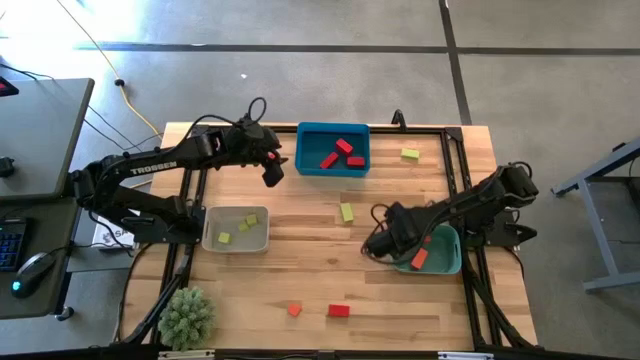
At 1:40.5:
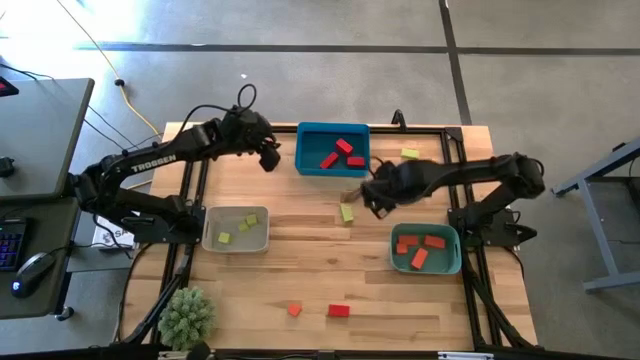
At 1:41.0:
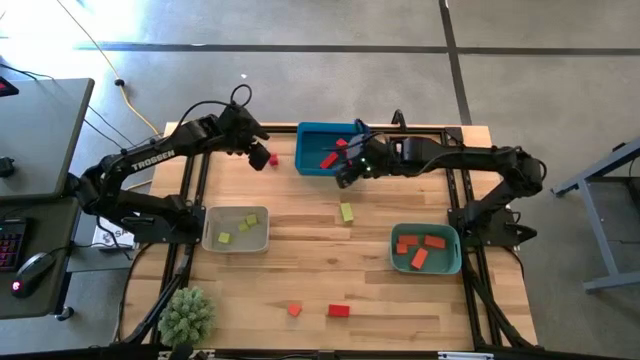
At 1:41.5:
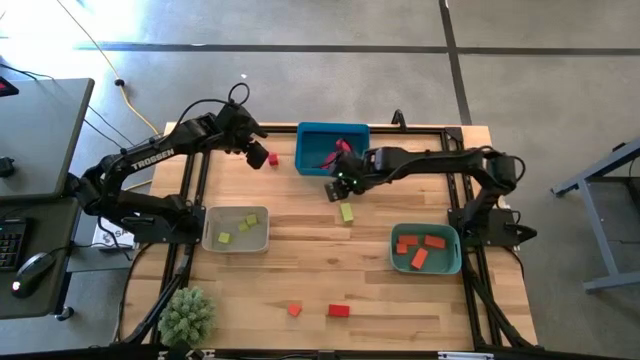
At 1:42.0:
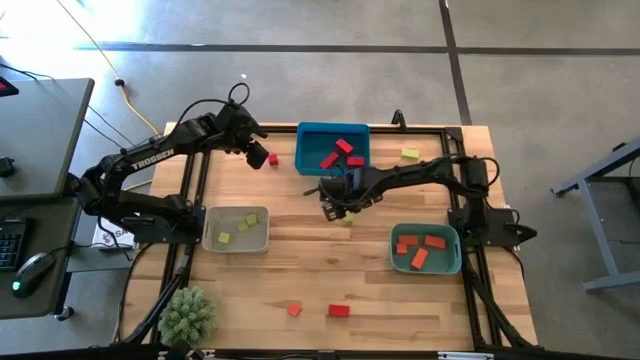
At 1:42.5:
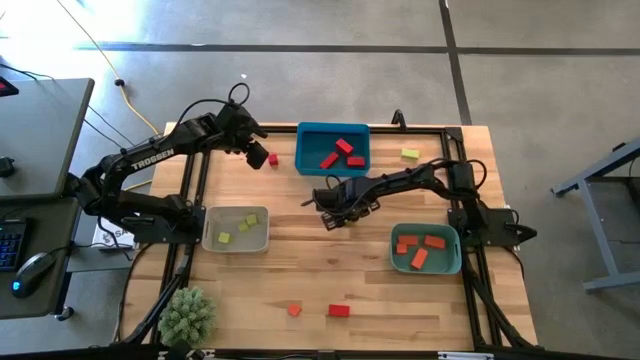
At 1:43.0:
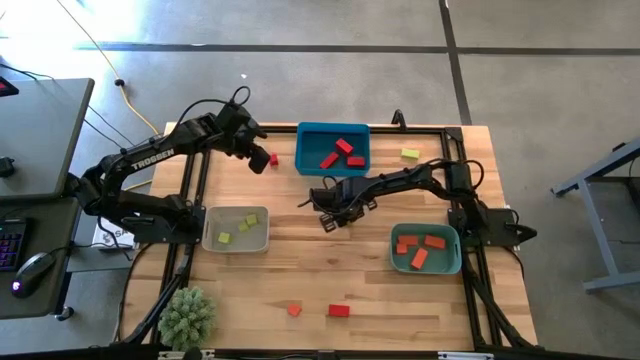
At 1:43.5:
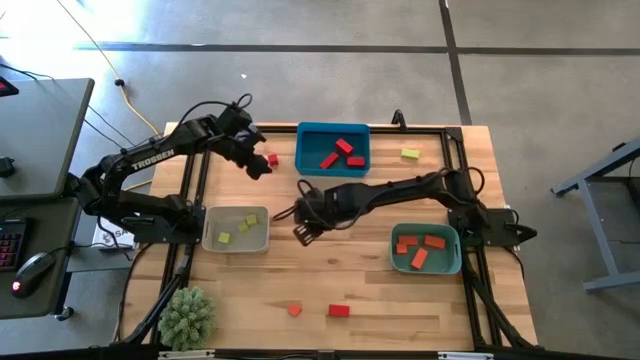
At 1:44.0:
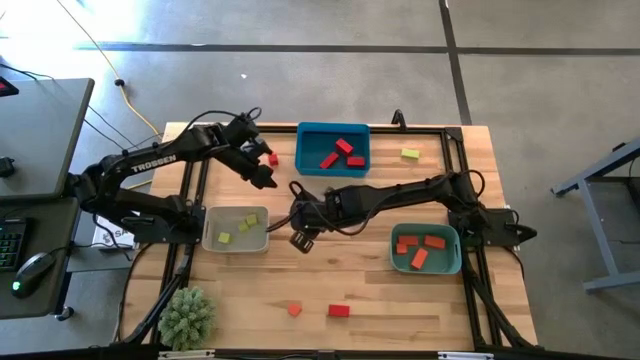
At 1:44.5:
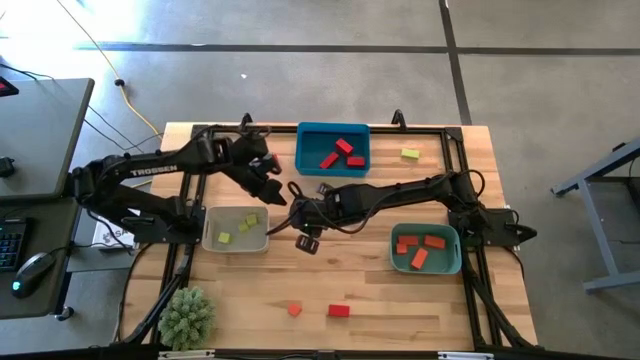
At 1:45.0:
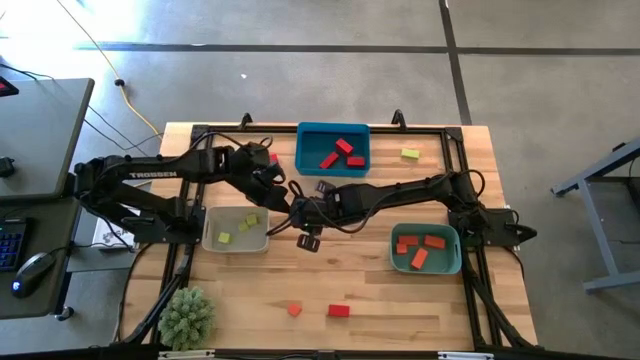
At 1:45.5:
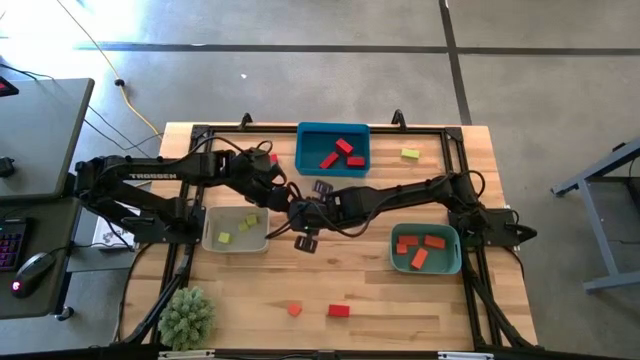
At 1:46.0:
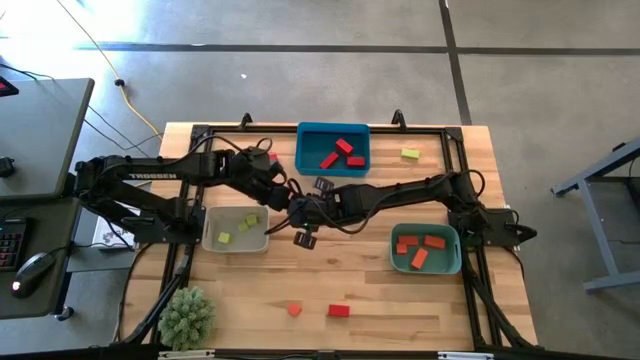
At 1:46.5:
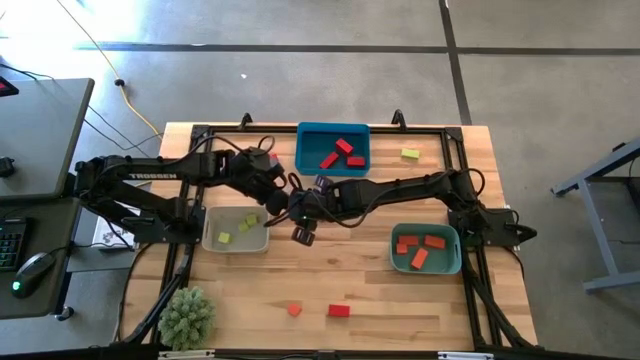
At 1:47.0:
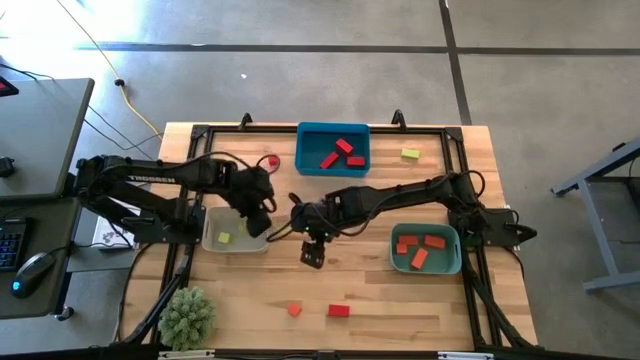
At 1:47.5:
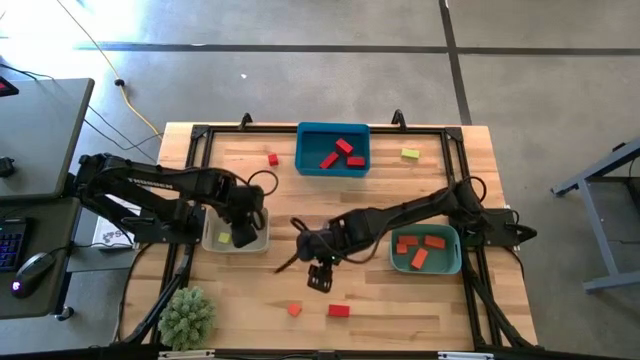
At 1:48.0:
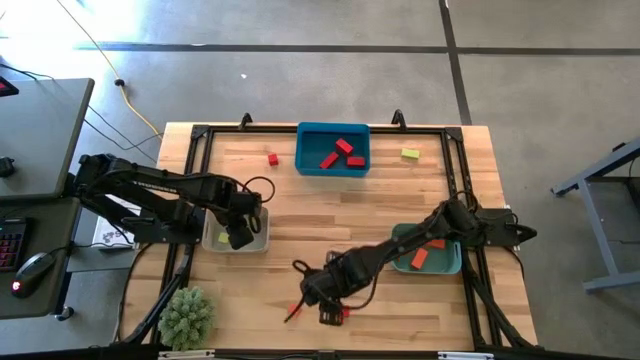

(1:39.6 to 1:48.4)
Task: Sort & place blocks by color
Put the bottom green block into the white bin

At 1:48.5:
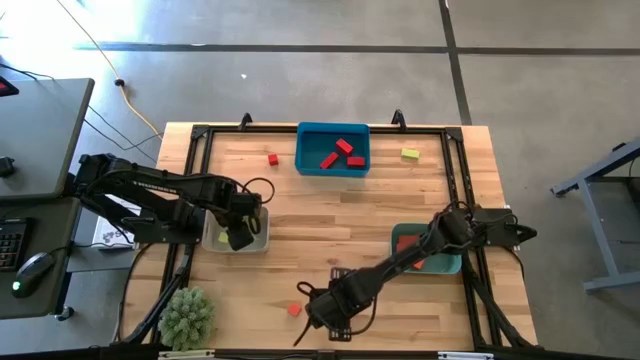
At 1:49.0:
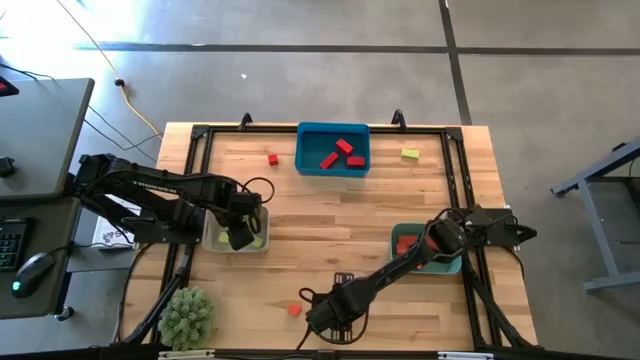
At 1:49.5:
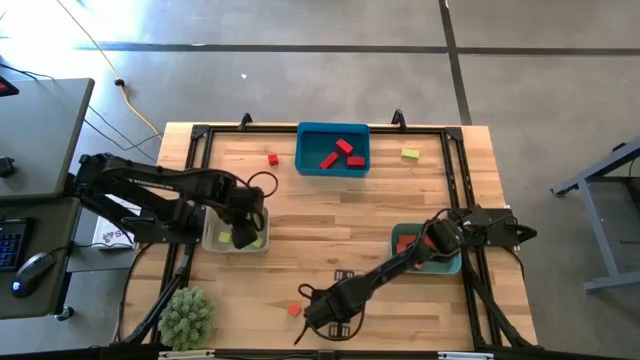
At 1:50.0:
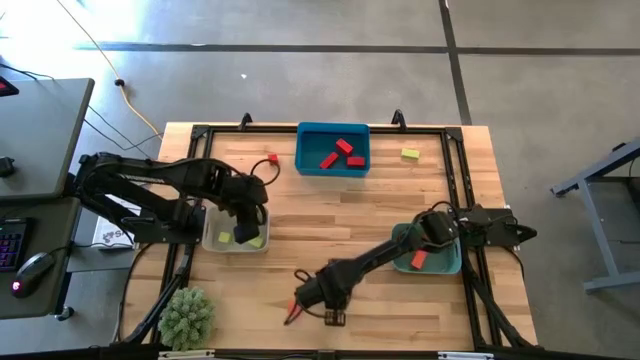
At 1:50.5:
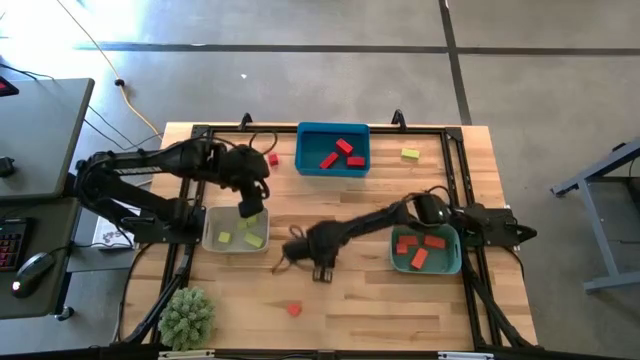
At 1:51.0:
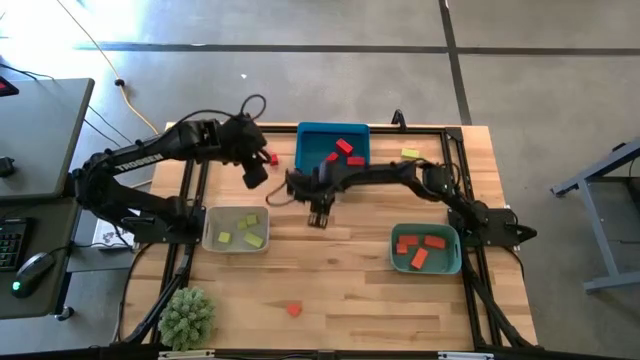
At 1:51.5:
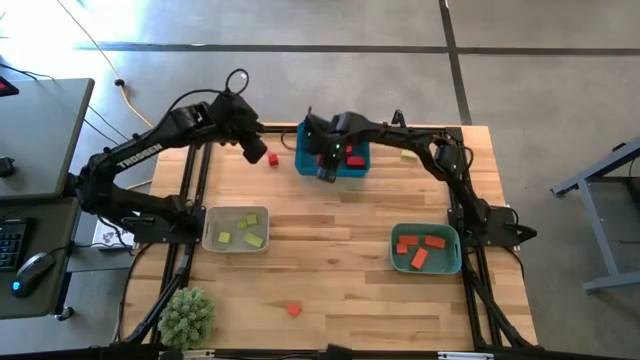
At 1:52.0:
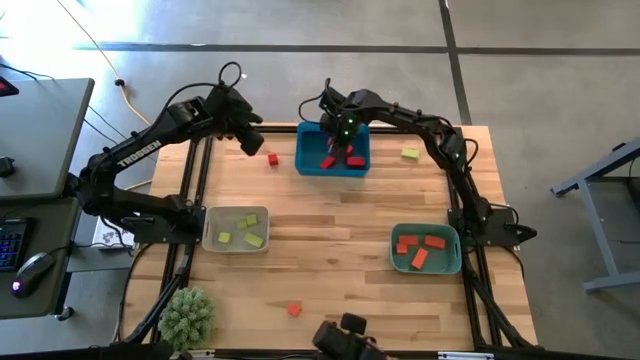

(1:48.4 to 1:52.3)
Put the bottom red block into the blue bin

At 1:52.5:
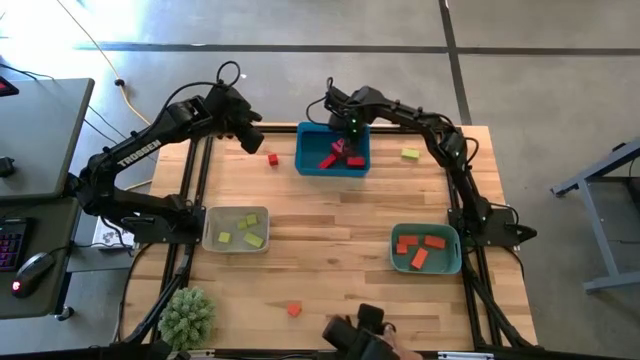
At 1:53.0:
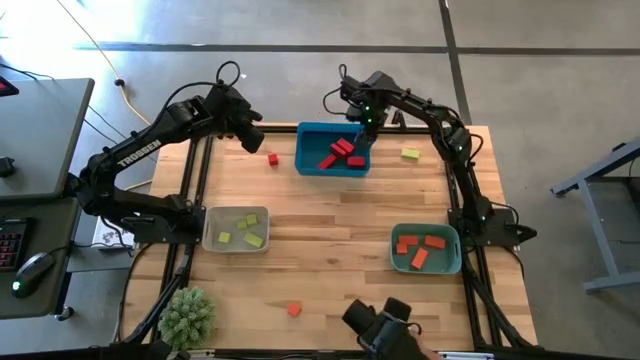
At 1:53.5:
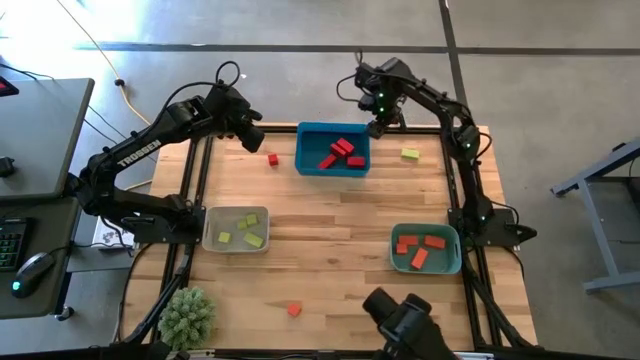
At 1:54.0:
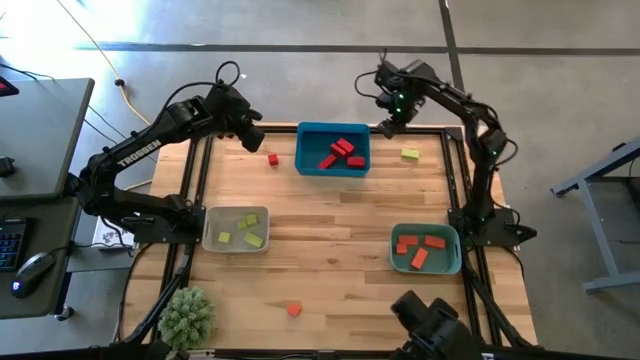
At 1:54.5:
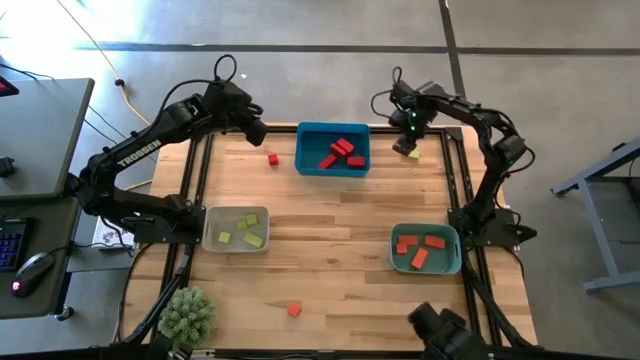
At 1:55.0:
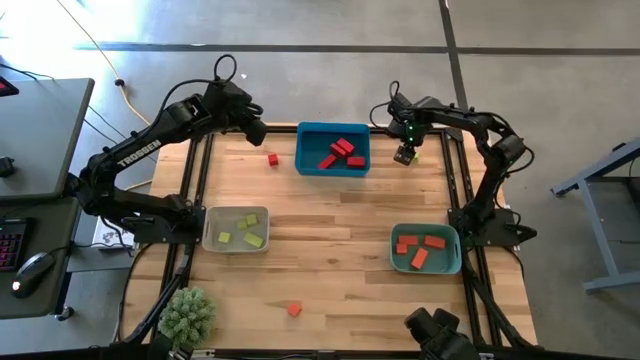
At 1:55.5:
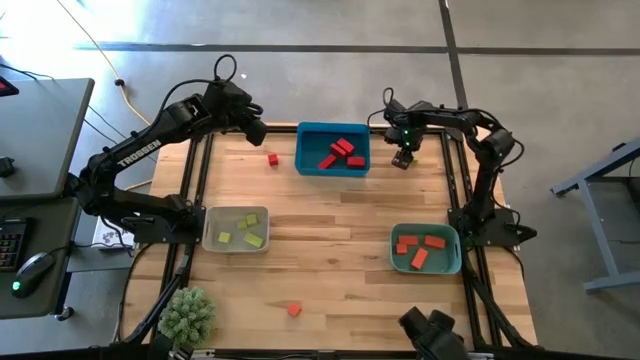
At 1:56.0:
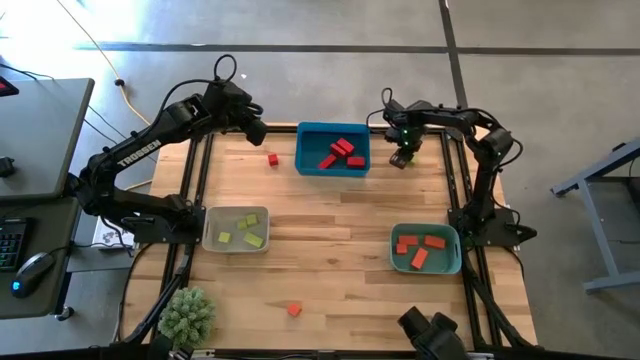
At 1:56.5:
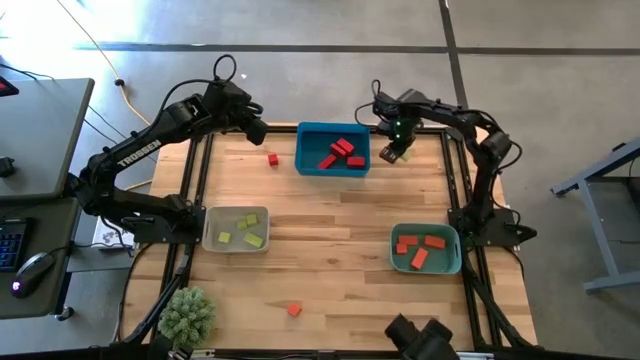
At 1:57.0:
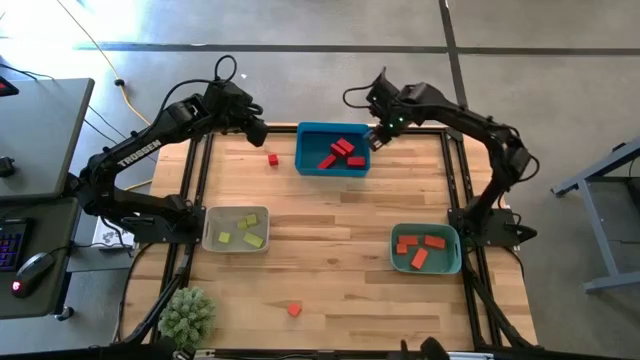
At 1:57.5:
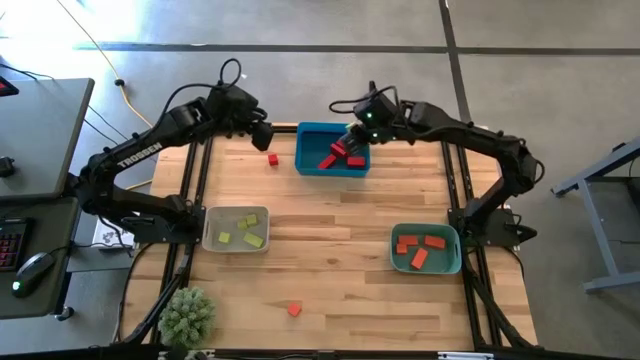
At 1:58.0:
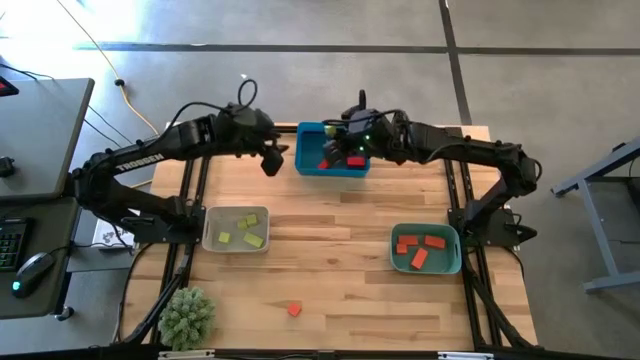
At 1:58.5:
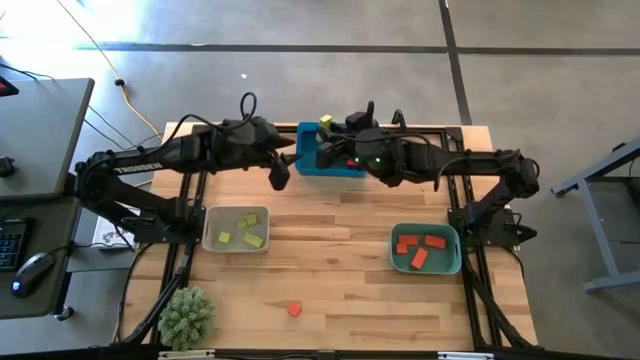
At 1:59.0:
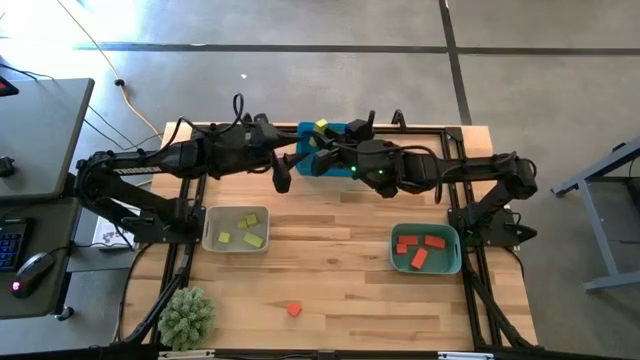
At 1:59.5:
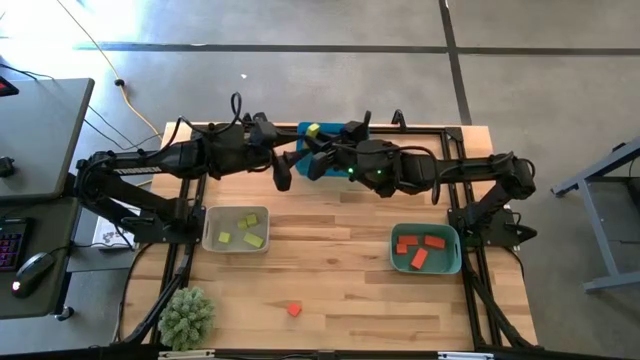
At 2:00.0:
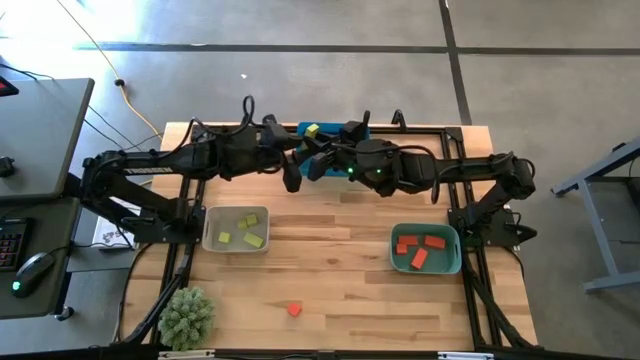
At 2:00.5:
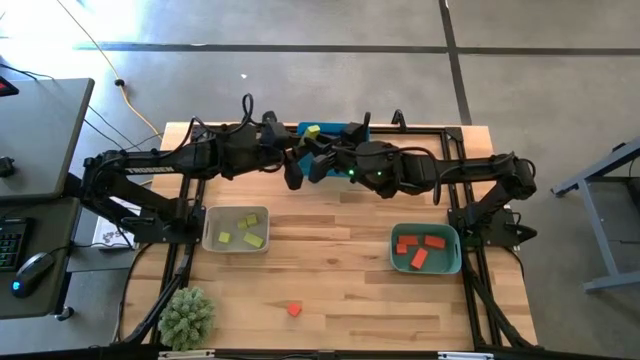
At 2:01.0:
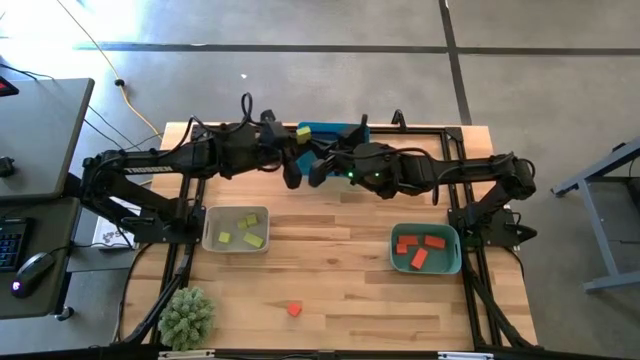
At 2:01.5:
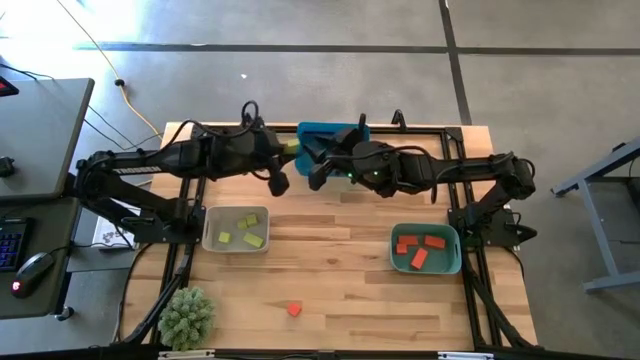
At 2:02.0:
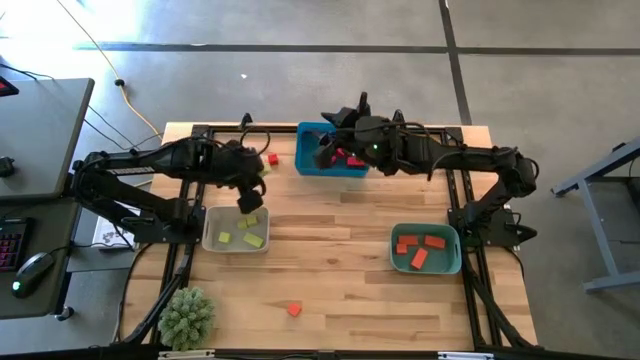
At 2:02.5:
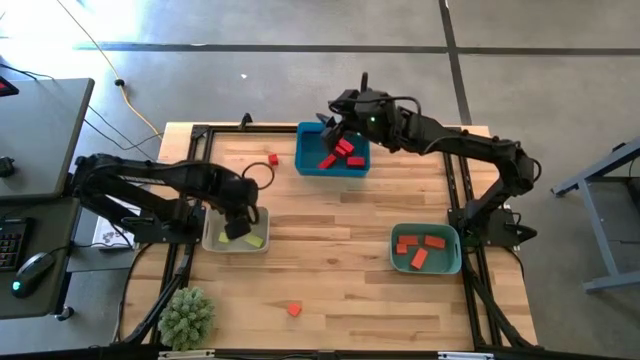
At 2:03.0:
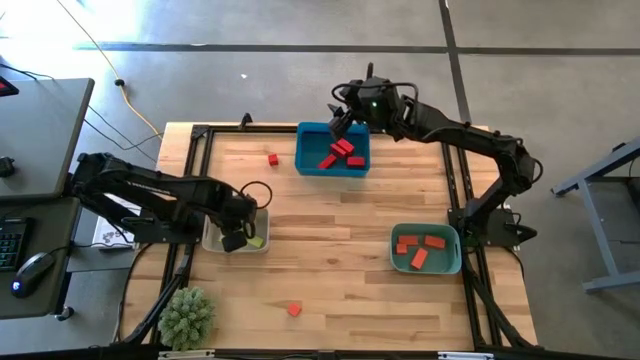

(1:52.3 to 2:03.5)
Put the green block into the white bin
